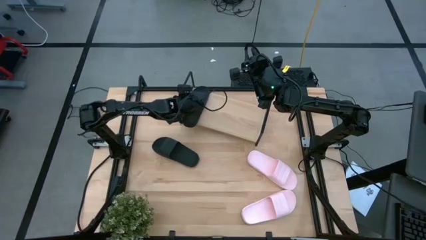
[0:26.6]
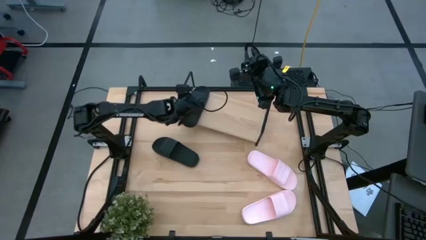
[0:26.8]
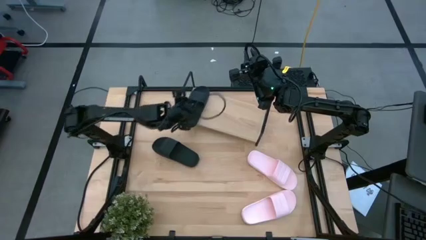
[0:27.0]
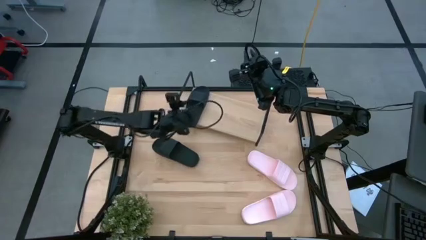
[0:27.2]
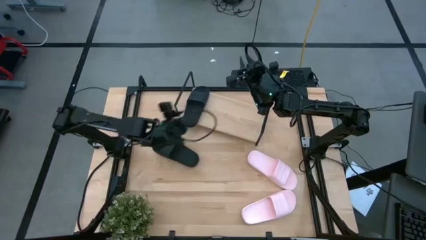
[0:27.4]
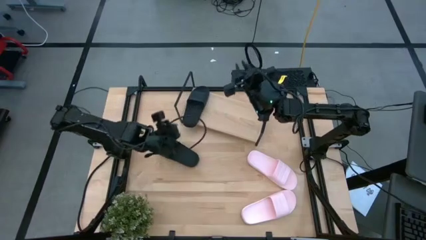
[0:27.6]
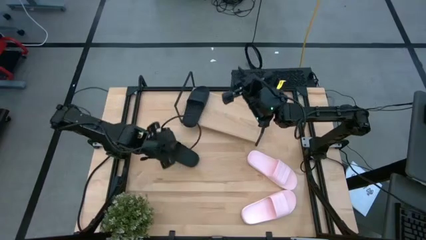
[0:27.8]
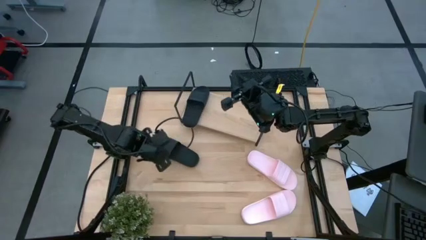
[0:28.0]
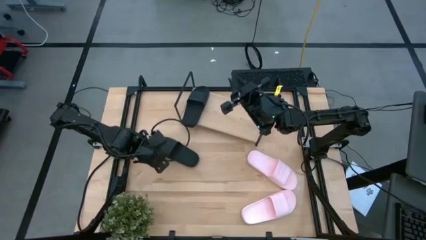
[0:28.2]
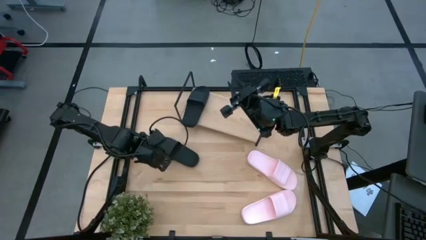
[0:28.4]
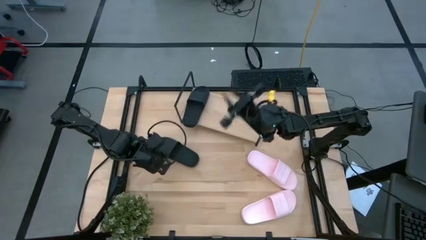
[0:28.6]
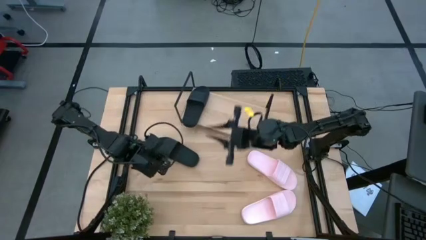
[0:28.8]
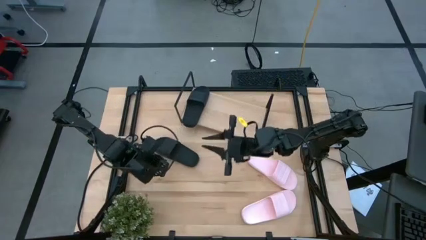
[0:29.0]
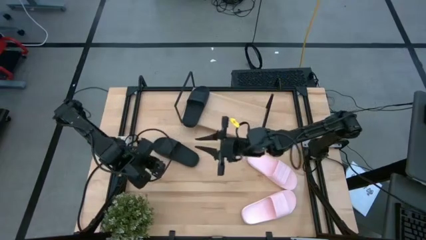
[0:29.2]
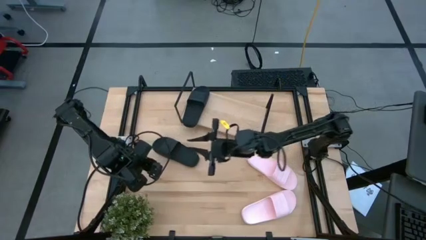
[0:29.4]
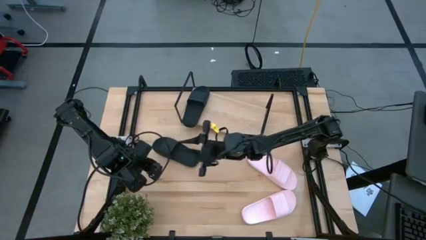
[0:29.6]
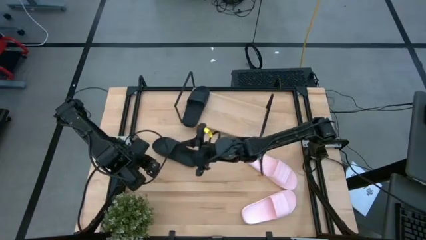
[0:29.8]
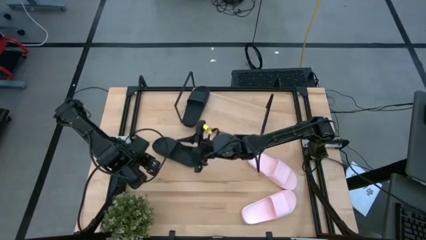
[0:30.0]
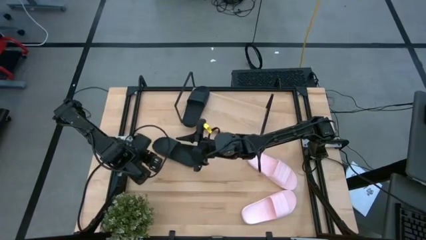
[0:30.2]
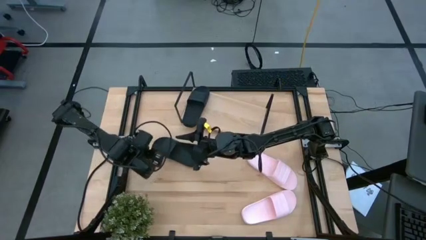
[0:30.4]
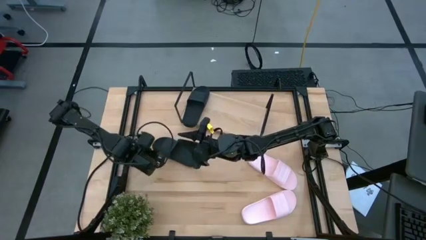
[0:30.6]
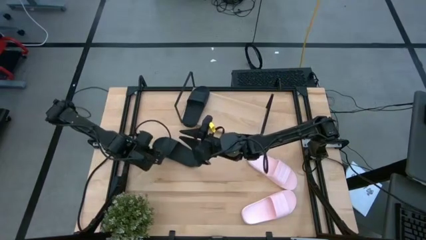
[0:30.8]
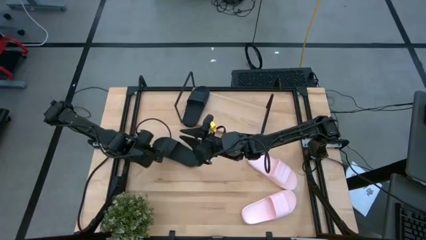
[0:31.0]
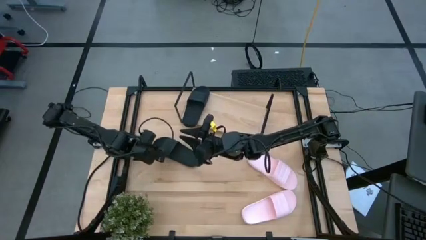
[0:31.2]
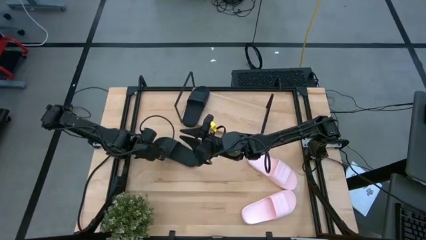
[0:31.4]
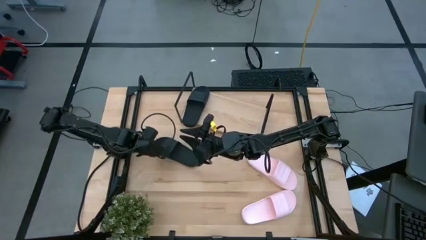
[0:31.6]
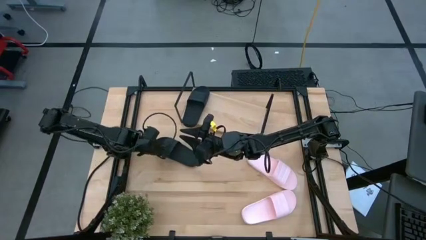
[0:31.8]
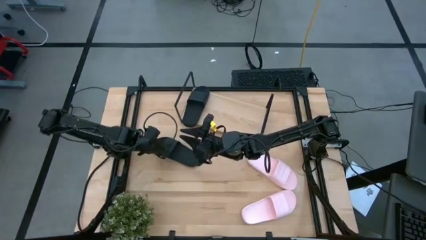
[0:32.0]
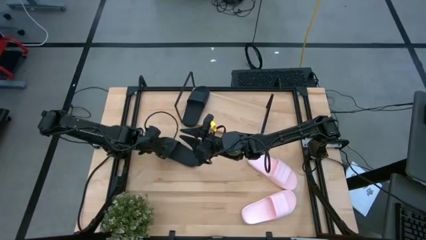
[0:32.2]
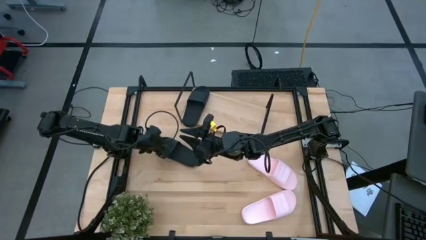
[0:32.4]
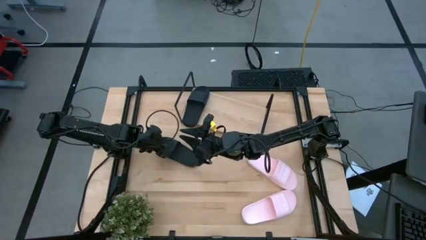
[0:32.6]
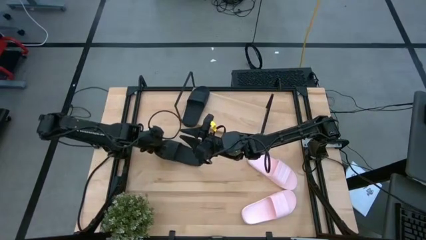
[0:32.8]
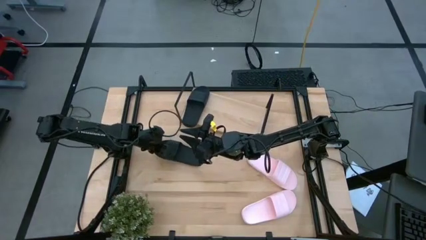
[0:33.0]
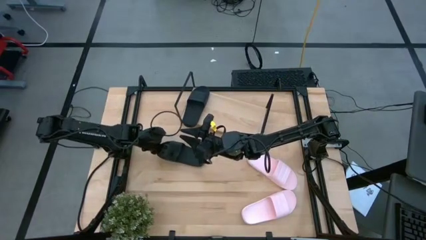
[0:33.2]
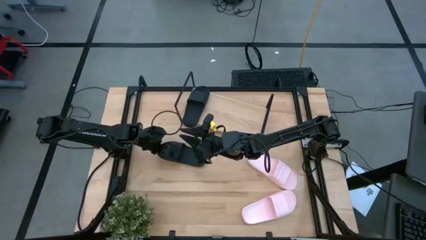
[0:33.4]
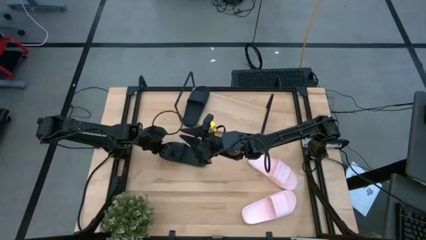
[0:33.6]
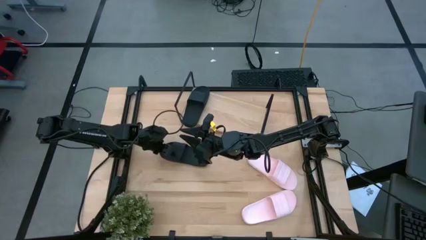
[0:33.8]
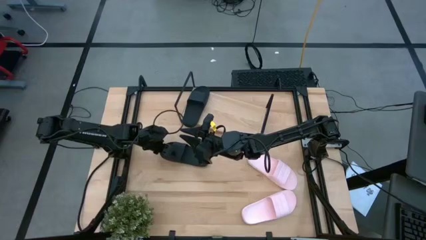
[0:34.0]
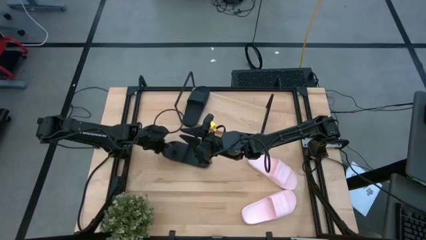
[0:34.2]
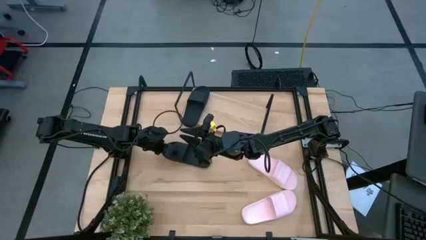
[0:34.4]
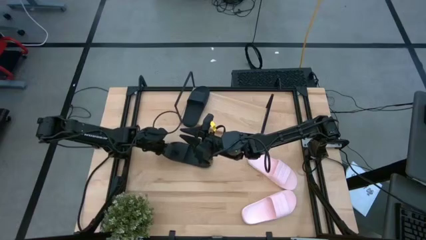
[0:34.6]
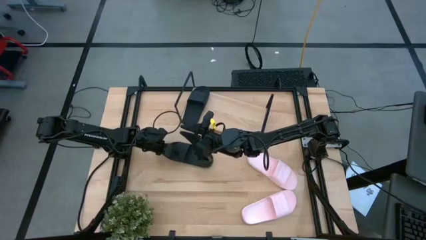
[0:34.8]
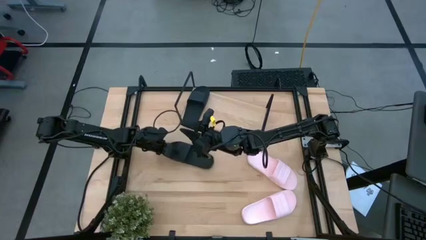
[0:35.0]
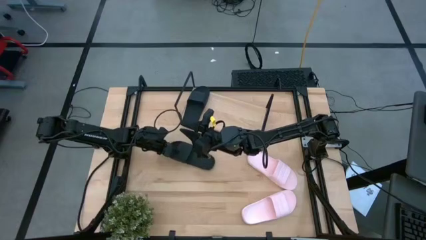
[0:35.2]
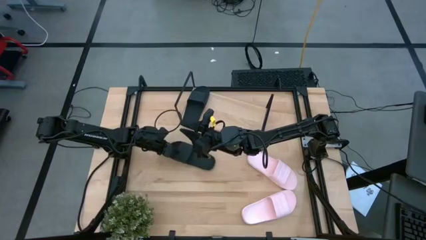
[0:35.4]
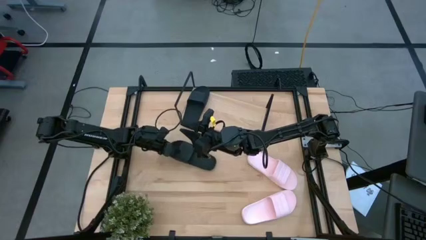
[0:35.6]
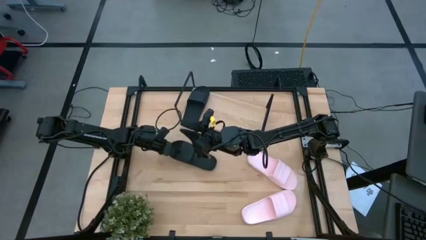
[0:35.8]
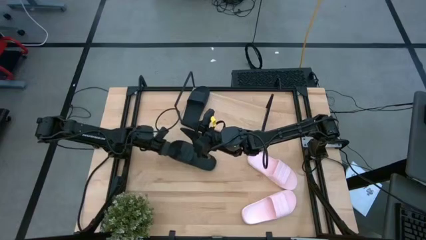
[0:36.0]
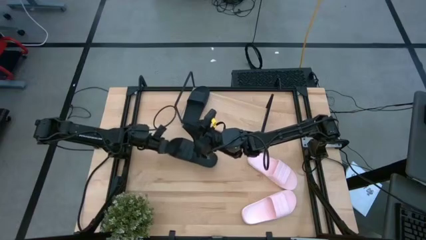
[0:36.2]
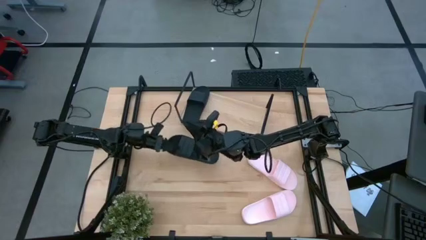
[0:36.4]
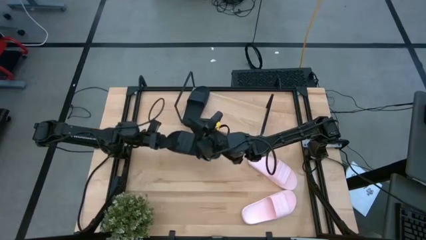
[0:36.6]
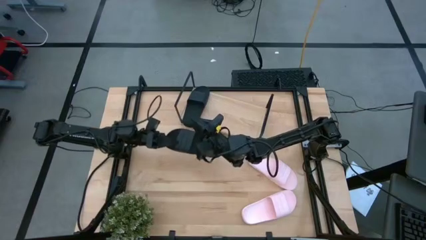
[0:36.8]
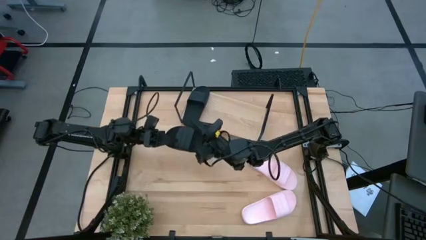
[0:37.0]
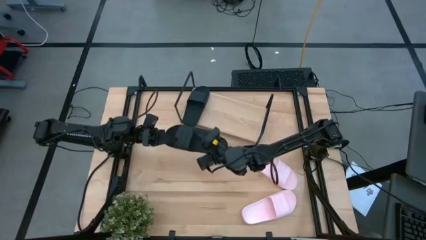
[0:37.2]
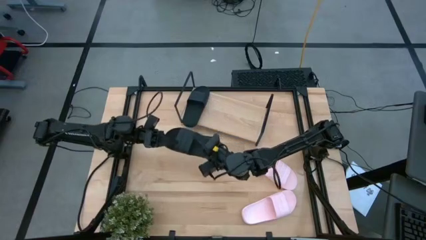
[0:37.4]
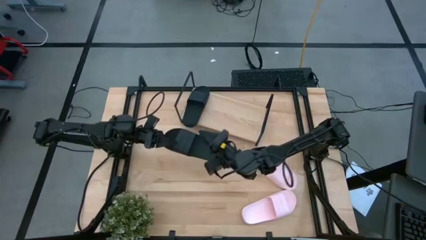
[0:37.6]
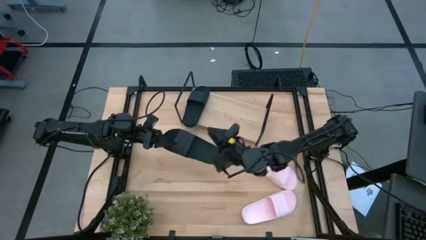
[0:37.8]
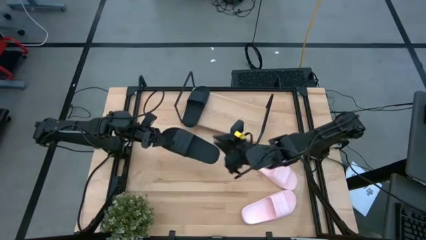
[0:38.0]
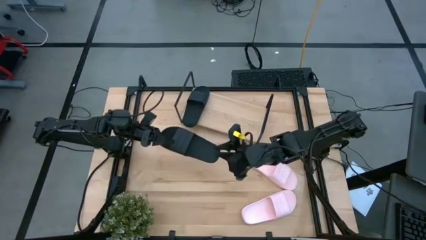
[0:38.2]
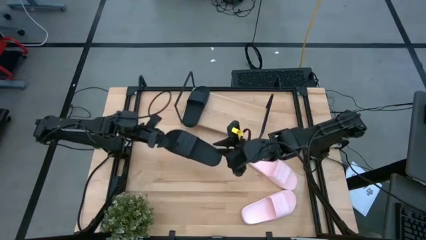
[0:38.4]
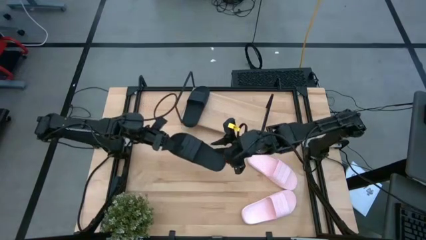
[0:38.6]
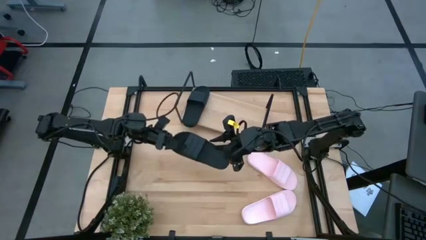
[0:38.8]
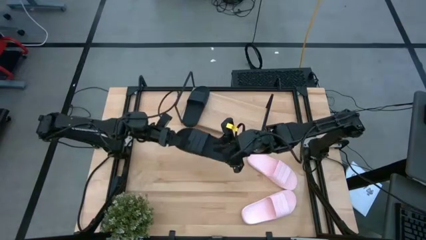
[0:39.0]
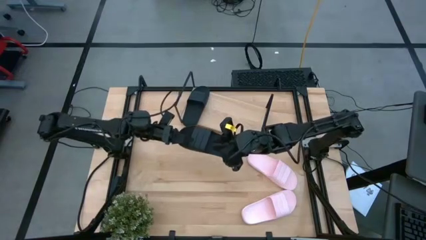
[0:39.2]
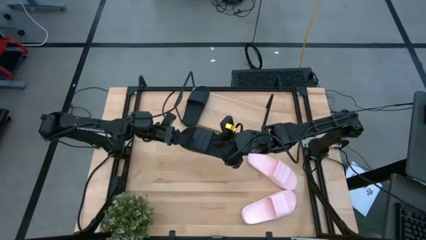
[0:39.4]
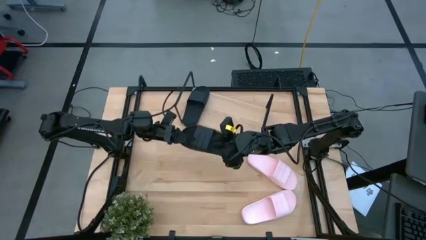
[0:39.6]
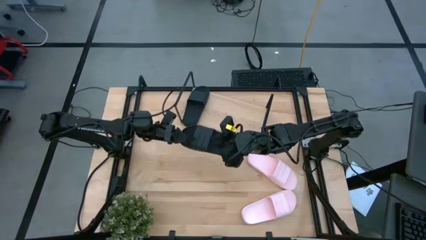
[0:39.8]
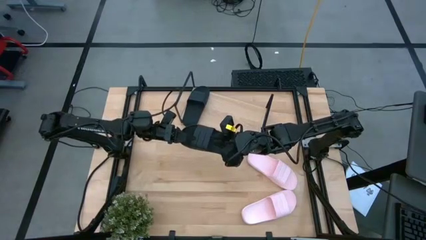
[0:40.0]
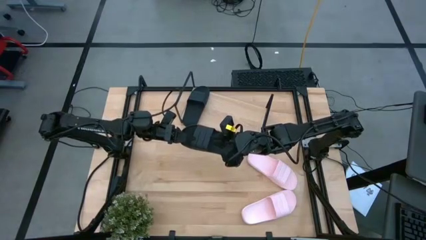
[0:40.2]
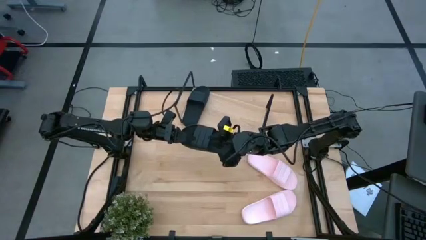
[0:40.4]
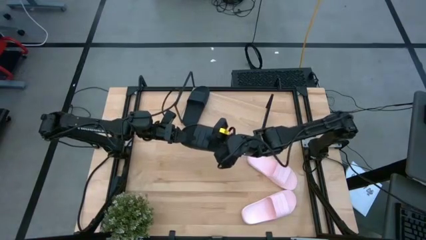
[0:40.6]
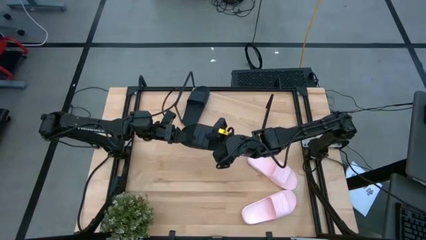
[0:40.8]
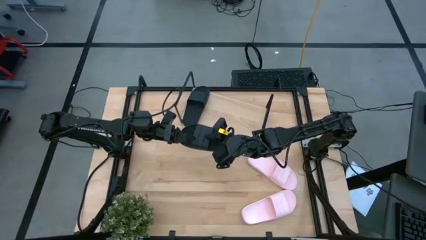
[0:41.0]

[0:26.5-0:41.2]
Task: Pick and place slides into the shelf
Put the black slipper on the shelf
